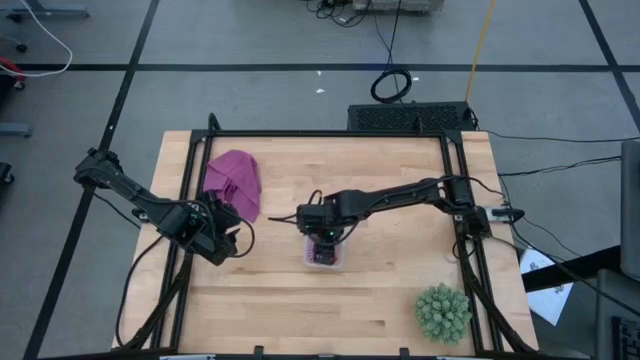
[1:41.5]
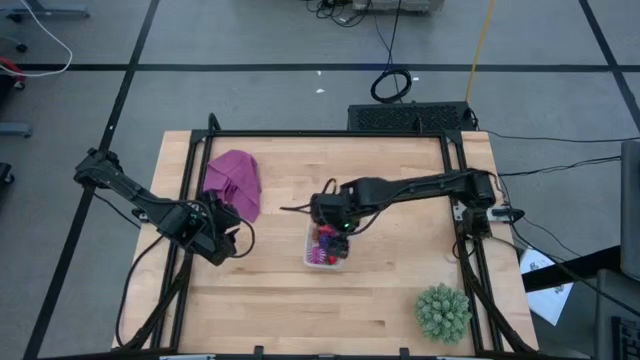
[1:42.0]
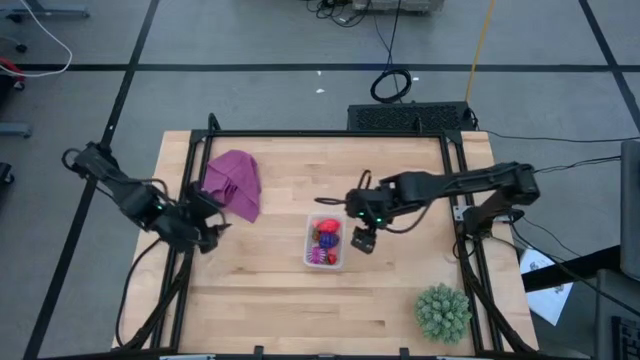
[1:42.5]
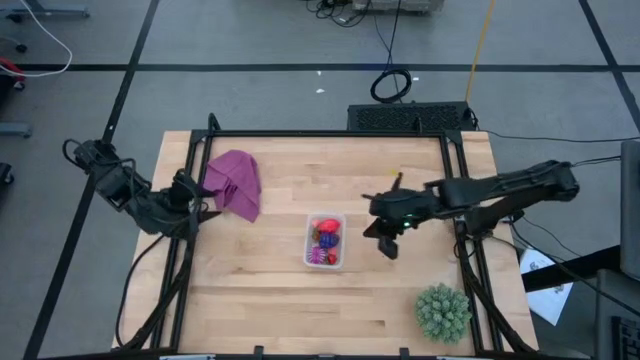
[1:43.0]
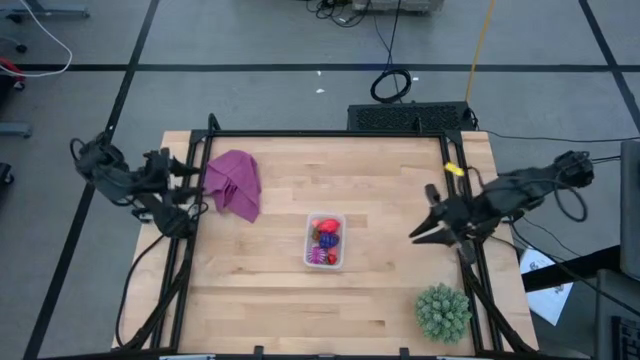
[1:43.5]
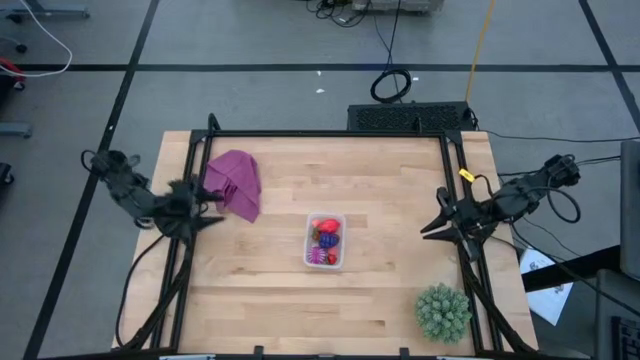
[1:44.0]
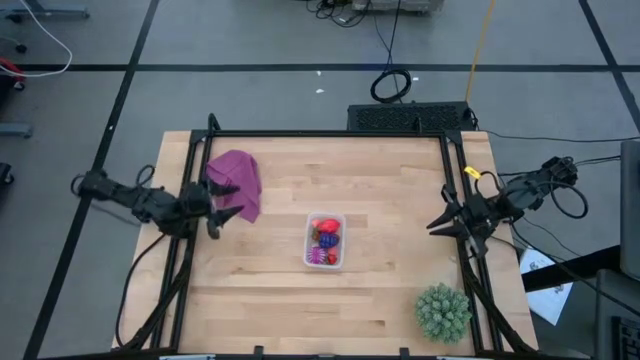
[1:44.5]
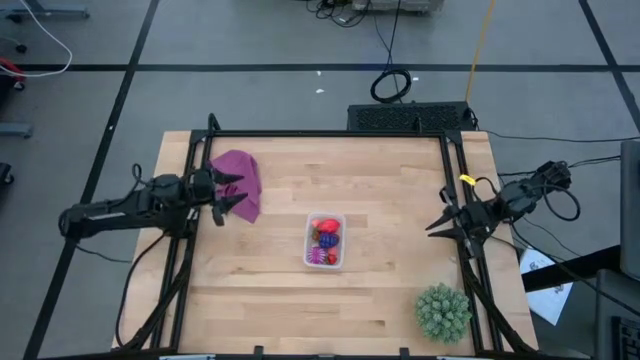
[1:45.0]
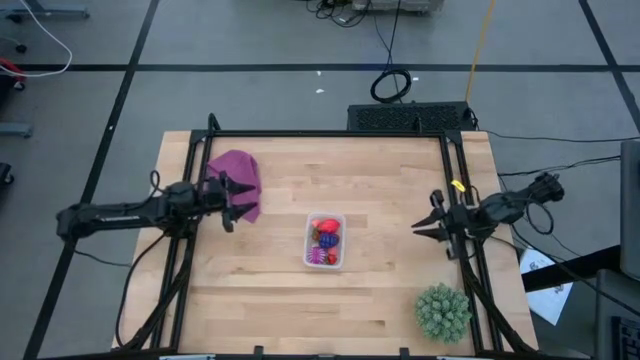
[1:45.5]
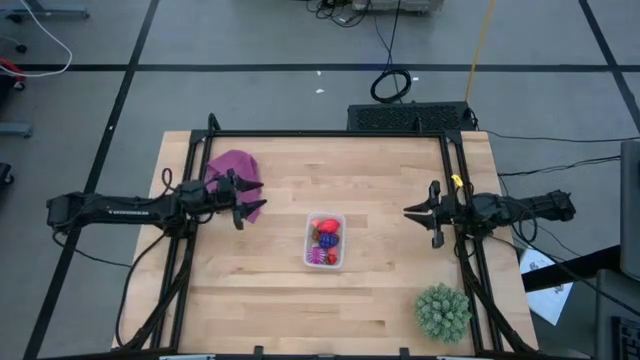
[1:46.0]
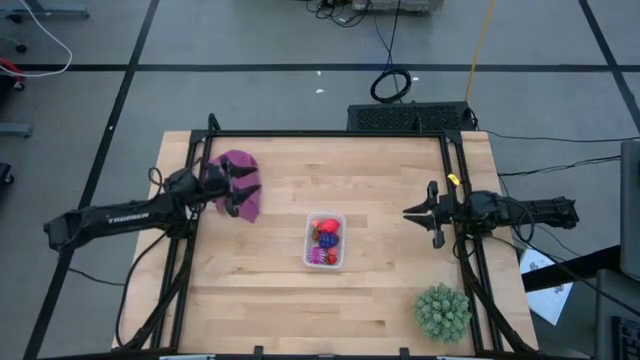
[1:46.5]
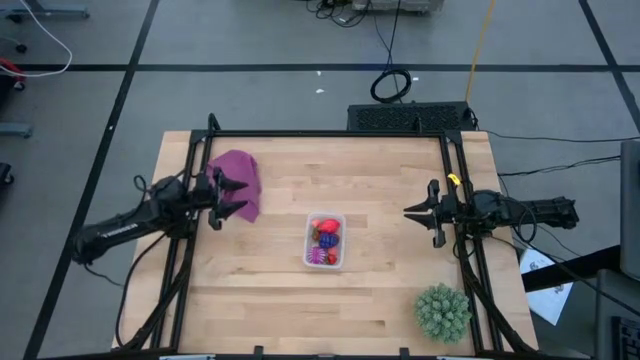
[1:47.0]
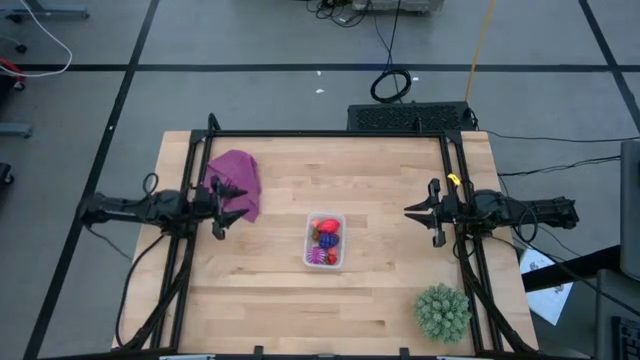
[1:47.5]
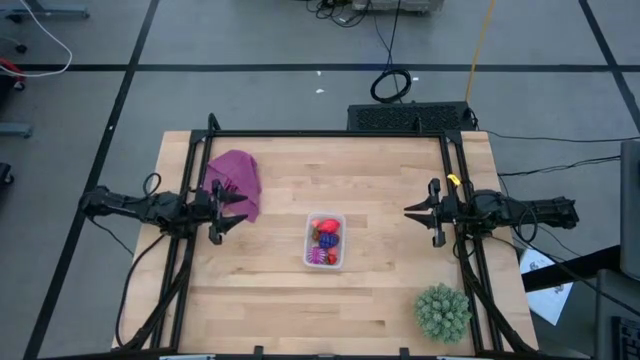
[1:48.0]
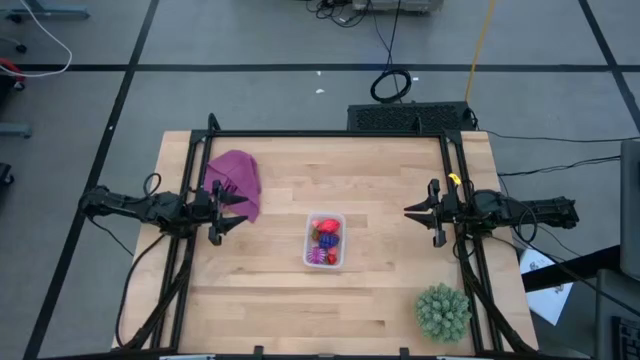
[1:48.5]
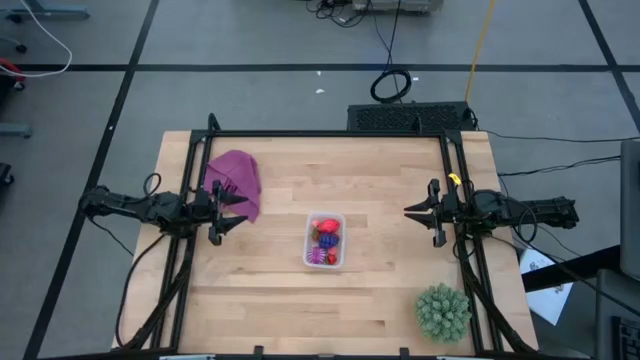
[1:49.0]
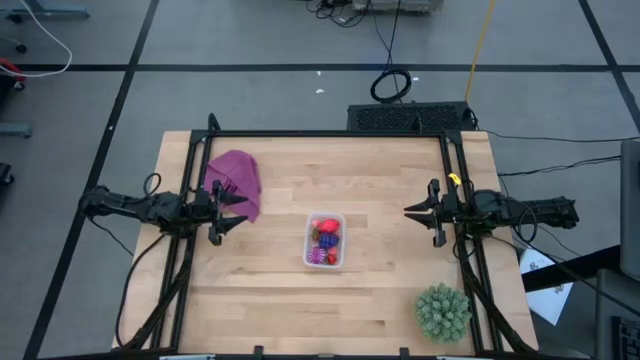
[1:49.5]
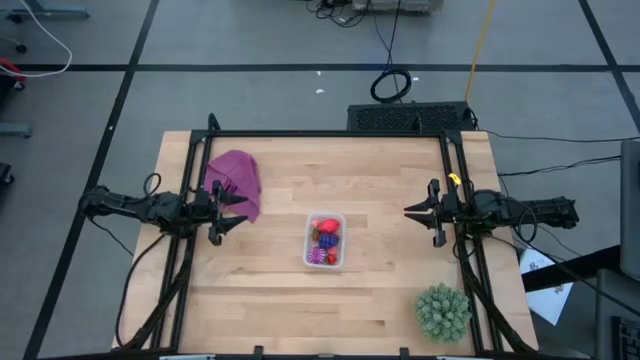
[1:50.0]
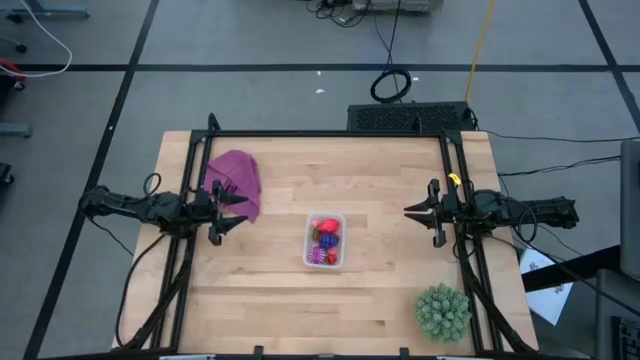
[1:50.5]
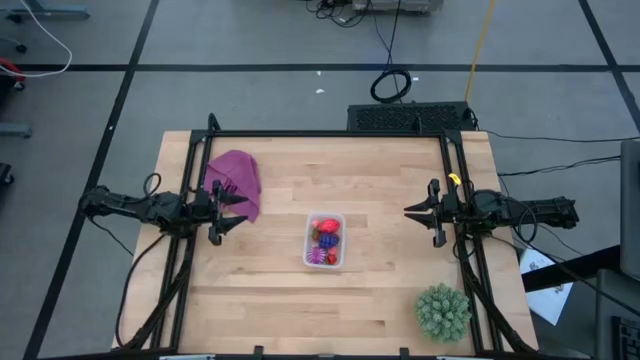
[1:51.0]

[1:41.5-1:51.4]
Task: Pick and placing Produce into tupperware
Return to Home Position

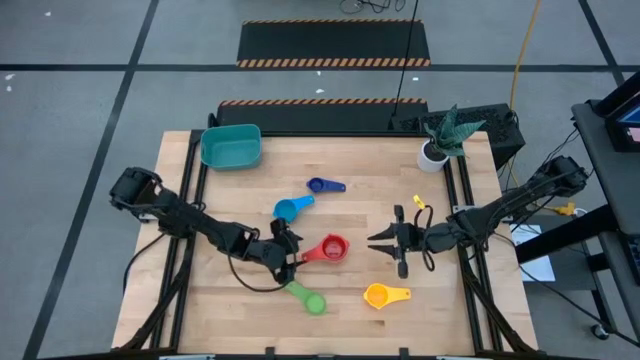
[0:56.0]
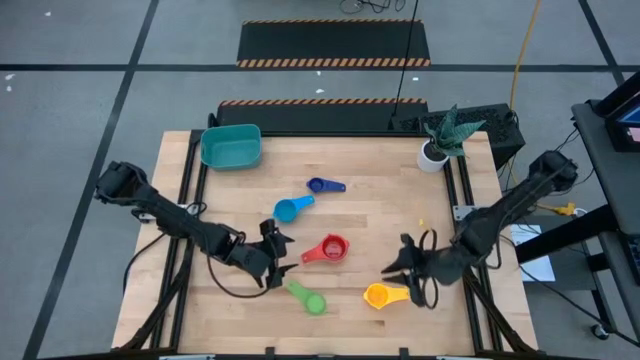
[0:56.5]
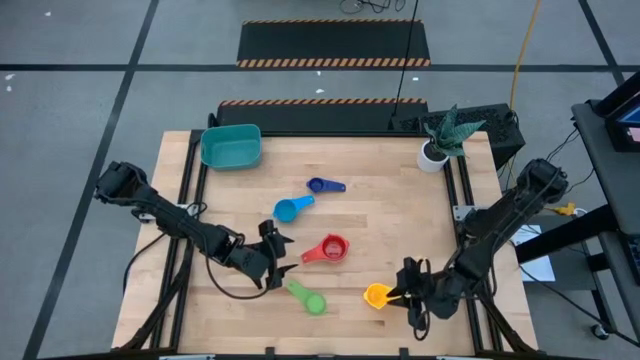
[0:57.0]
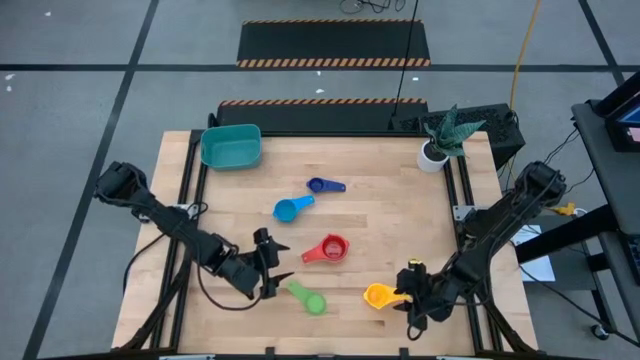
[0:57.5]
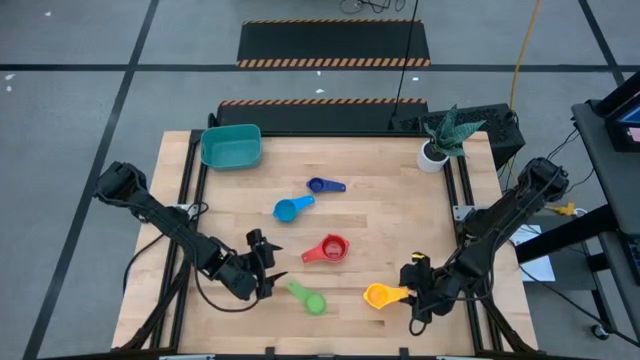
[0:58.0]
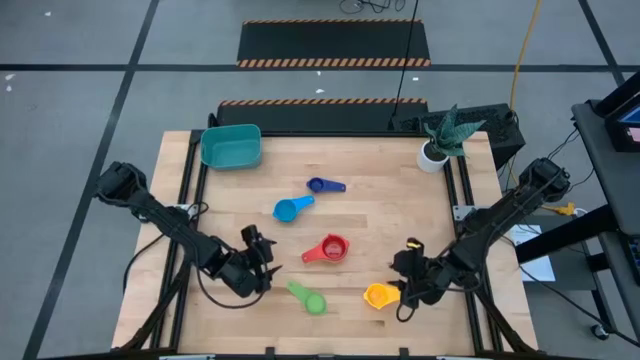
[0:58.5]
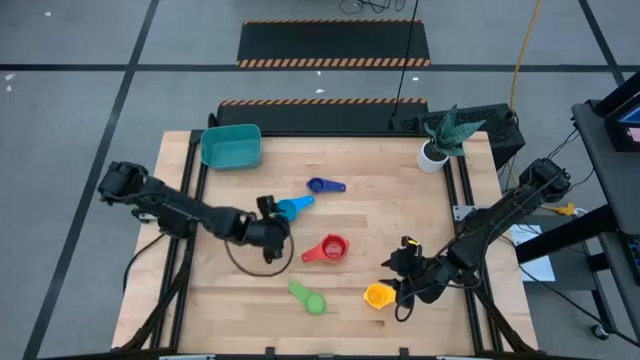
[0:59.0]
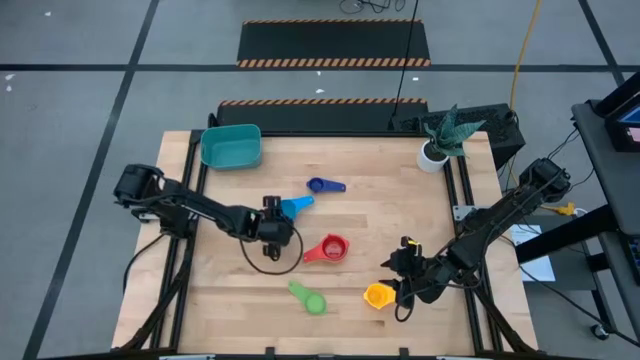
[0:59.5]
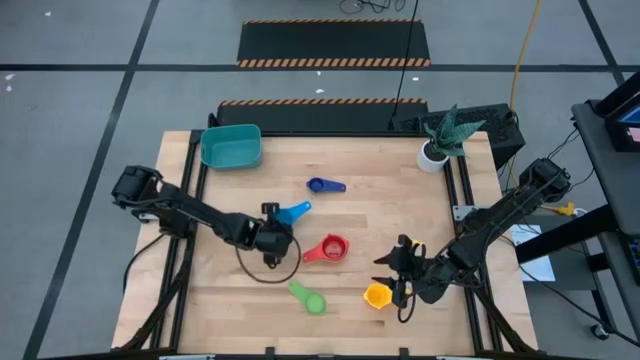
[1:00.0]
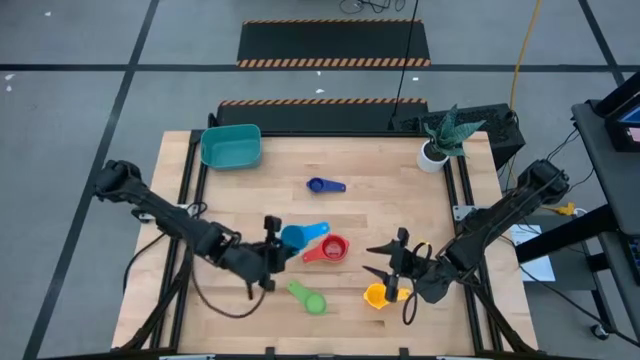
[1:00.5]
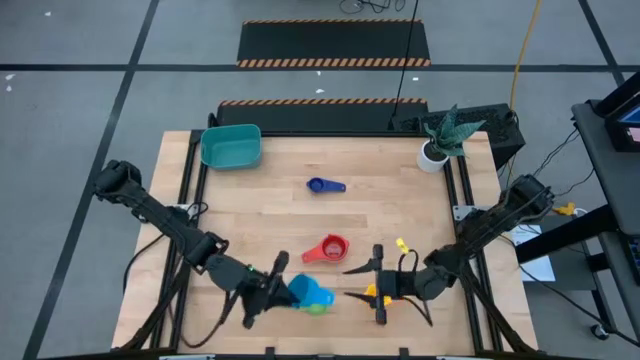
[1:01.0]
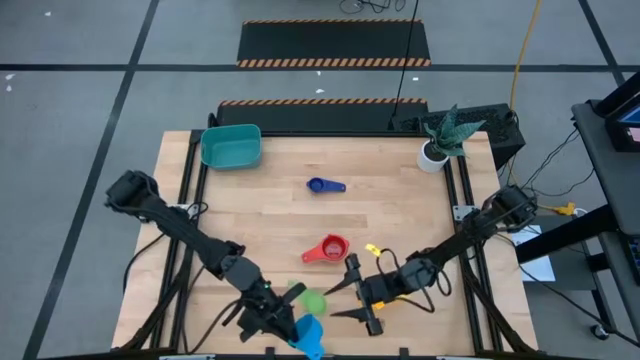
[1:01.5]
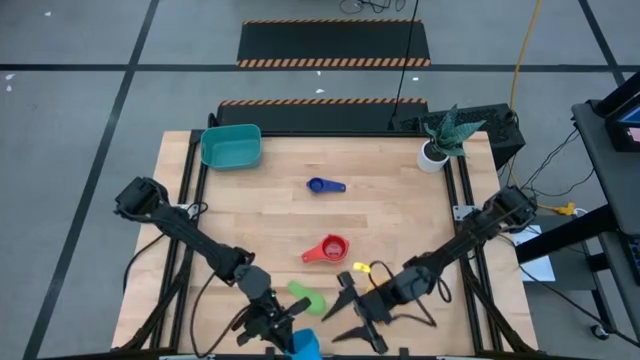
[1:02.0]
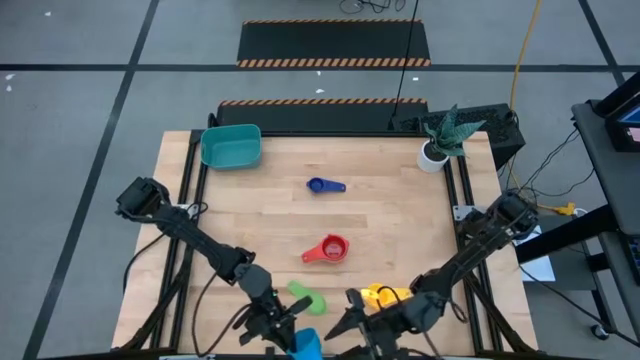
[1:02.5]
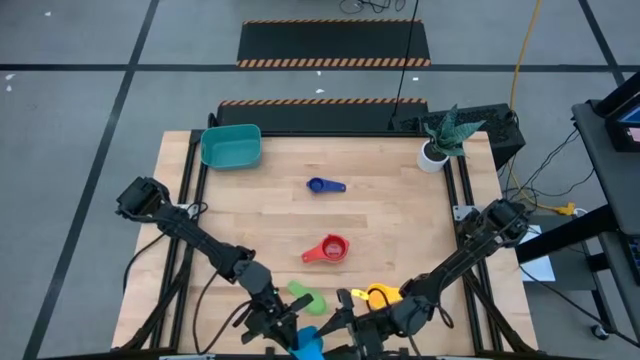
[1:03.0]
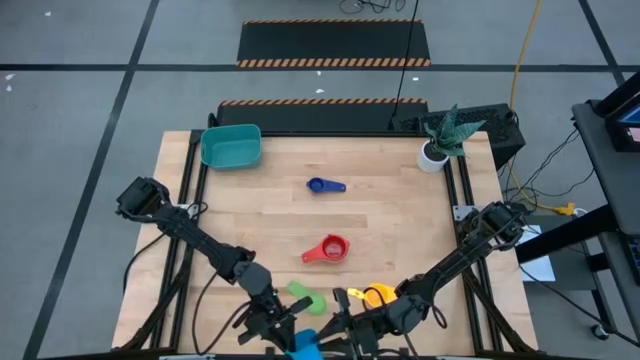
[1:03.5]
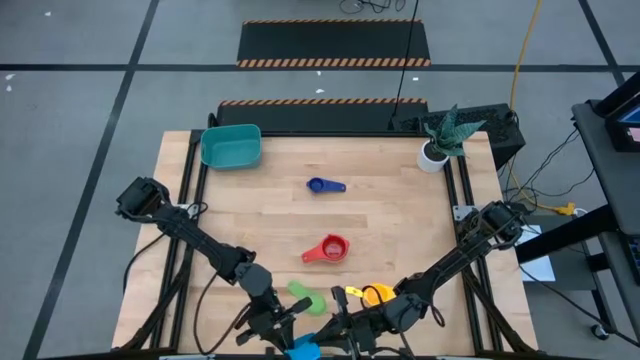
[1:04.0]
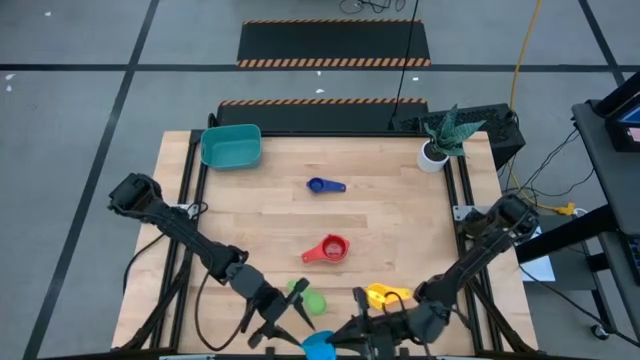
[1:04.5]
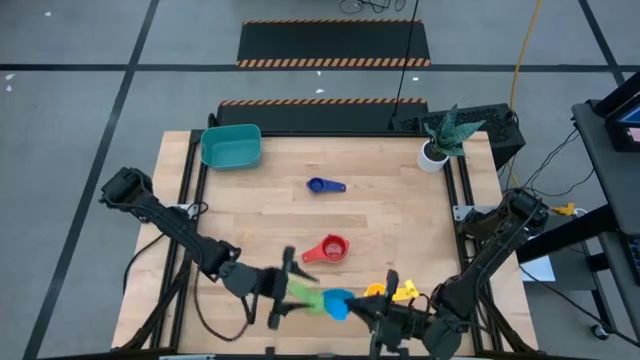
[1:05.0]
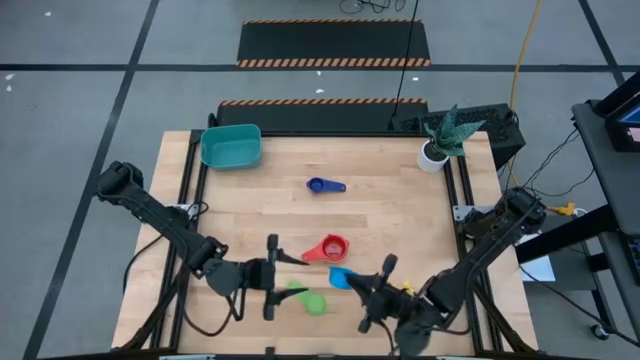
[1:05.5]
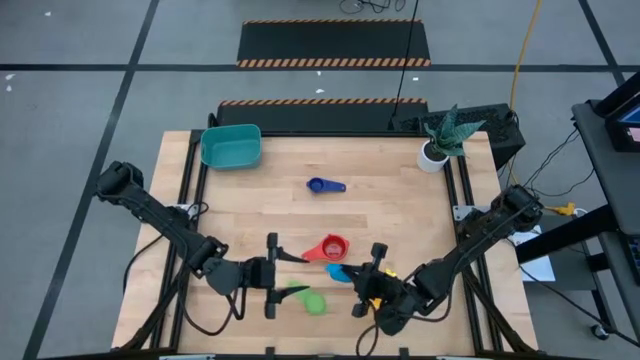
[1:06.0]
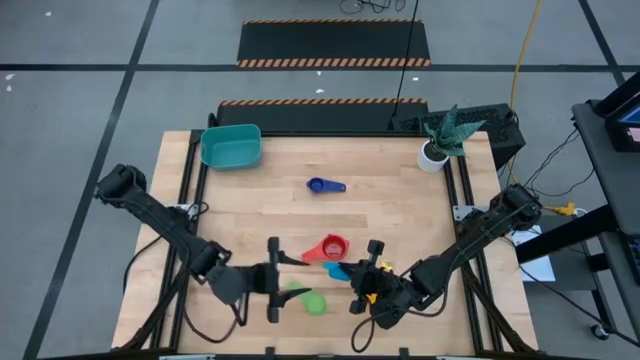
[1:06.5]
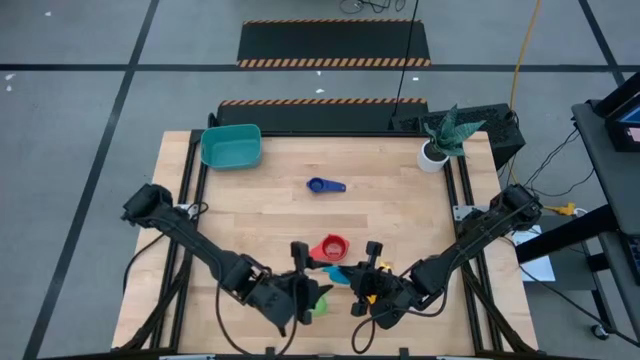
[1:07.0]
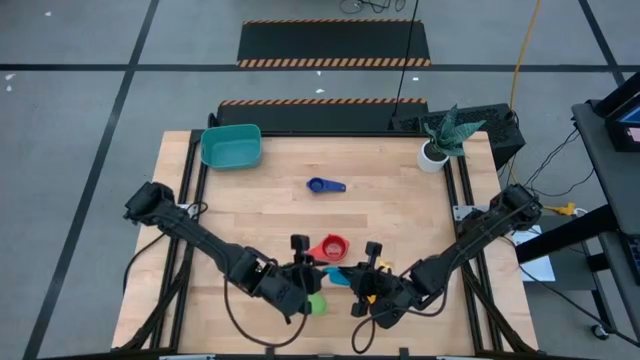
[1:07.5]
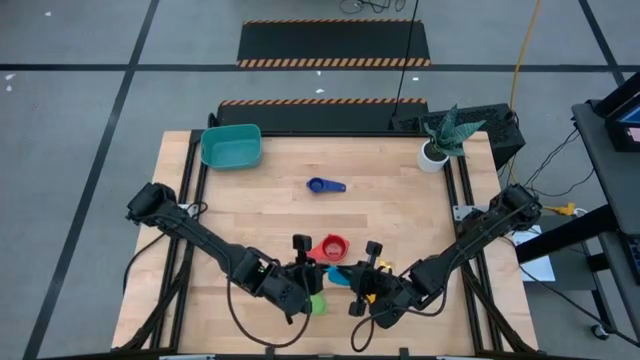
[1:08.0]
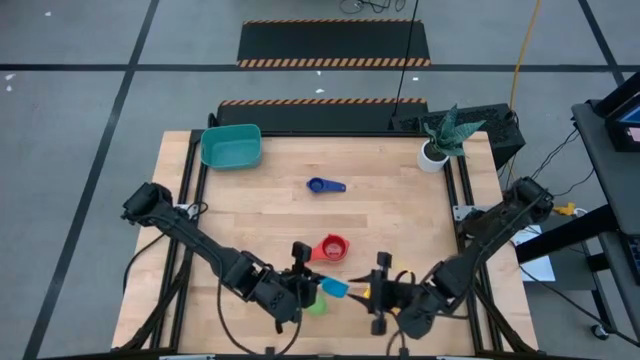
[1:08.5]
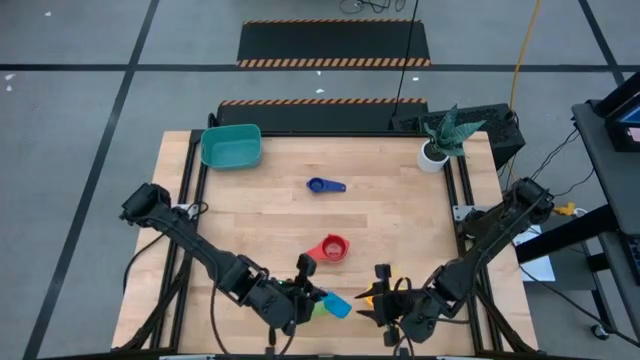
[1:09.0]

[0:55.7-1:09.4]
Task: Nest measuring cups in basket
Stack the light blue measuring cup on top of the red measuring cup
